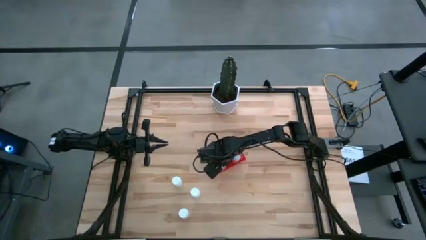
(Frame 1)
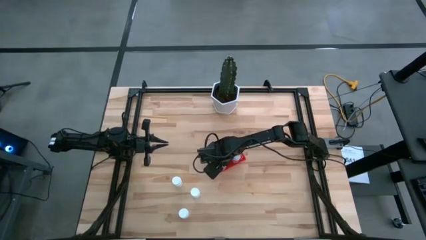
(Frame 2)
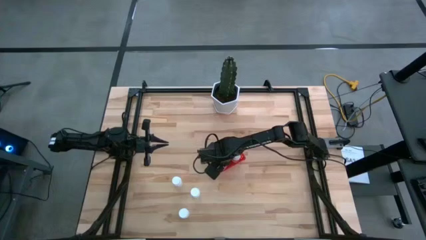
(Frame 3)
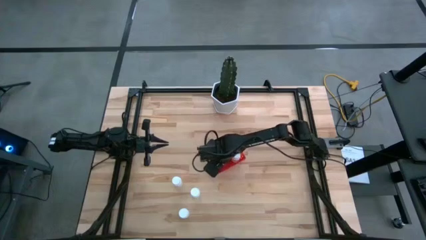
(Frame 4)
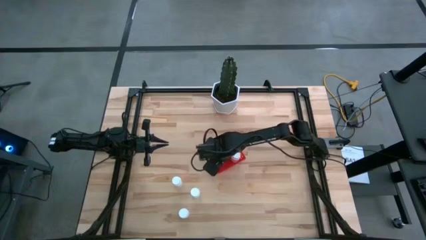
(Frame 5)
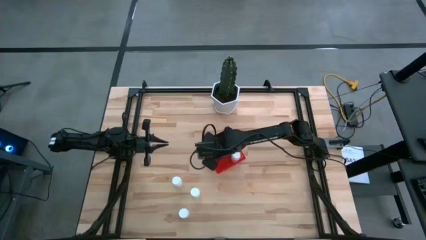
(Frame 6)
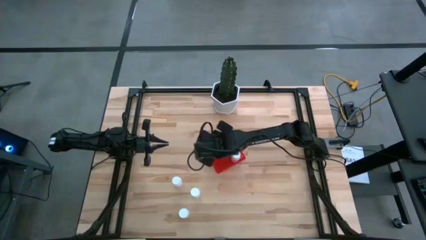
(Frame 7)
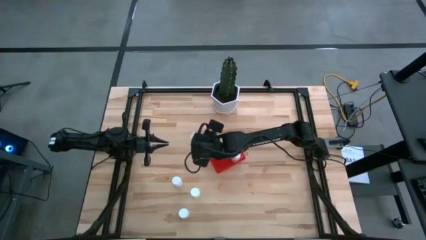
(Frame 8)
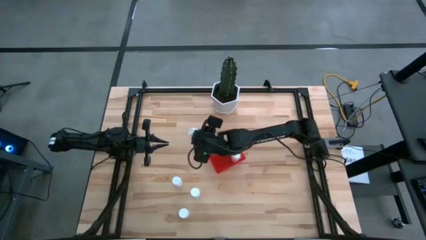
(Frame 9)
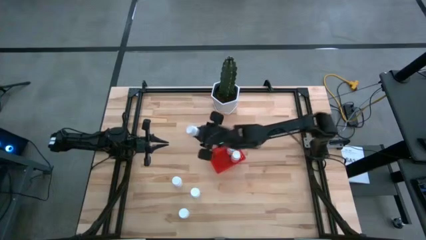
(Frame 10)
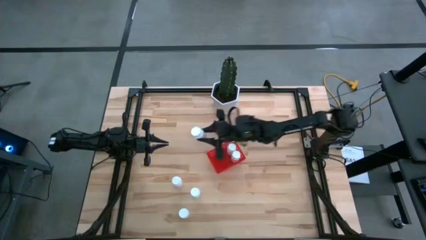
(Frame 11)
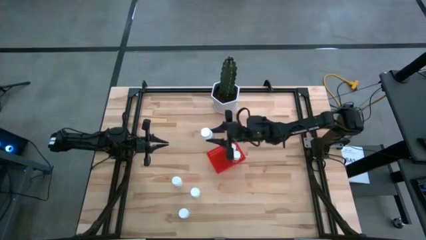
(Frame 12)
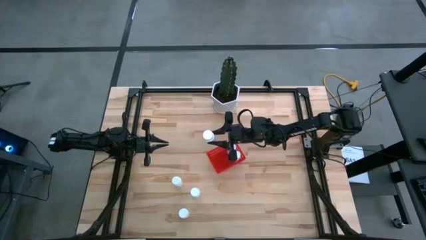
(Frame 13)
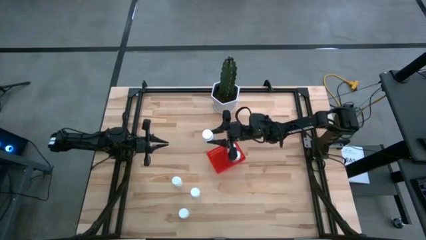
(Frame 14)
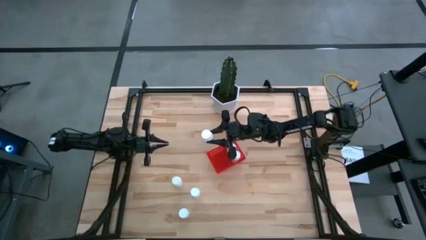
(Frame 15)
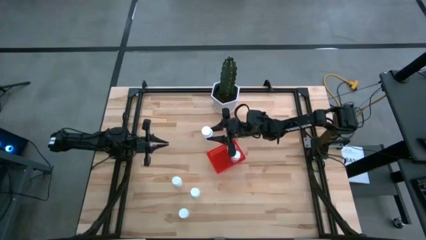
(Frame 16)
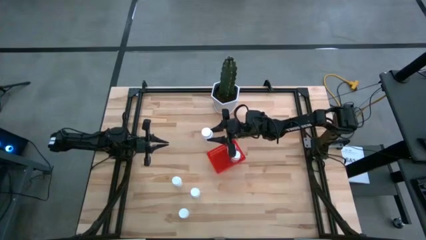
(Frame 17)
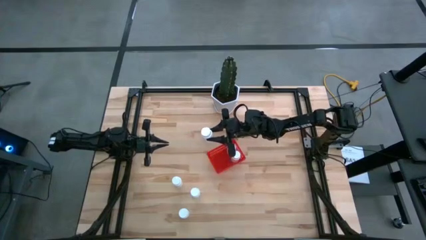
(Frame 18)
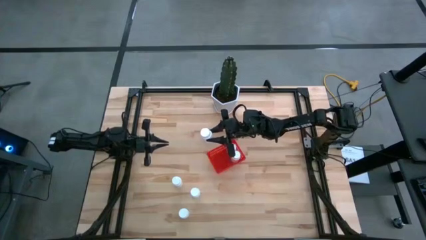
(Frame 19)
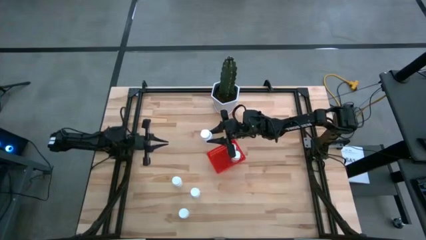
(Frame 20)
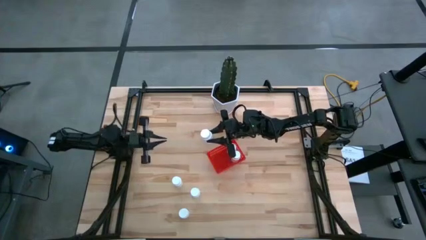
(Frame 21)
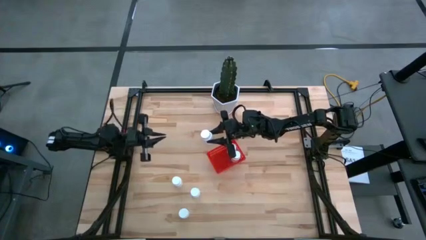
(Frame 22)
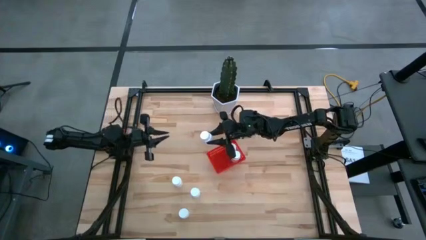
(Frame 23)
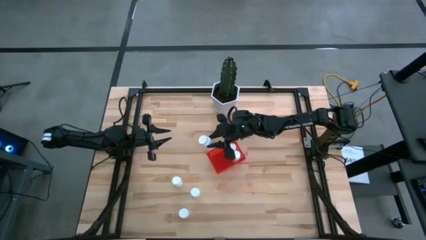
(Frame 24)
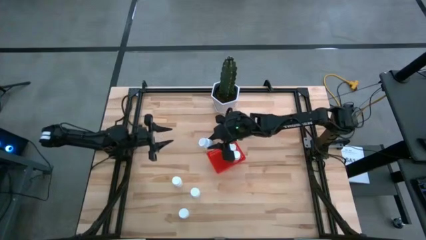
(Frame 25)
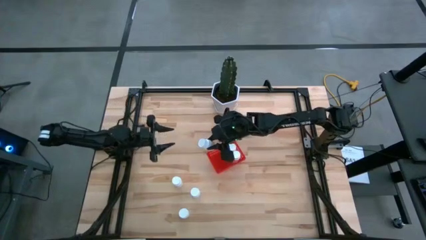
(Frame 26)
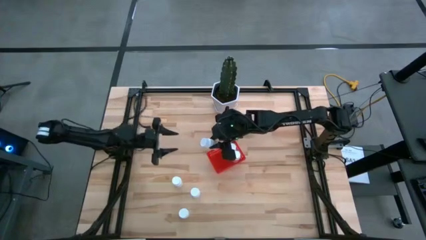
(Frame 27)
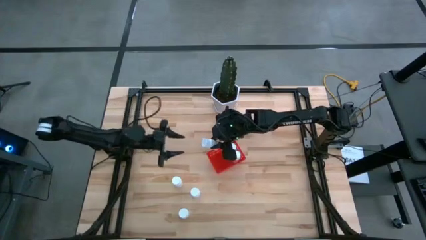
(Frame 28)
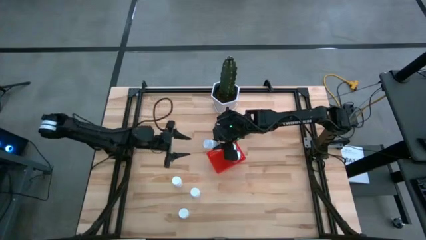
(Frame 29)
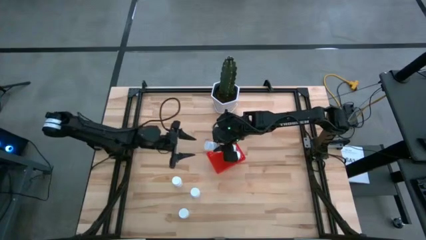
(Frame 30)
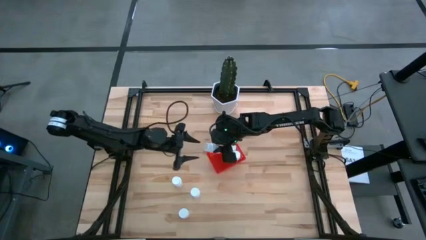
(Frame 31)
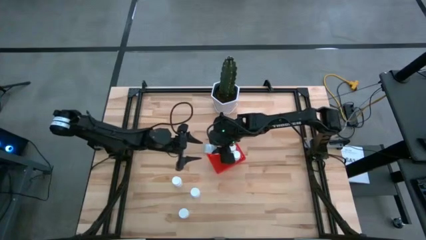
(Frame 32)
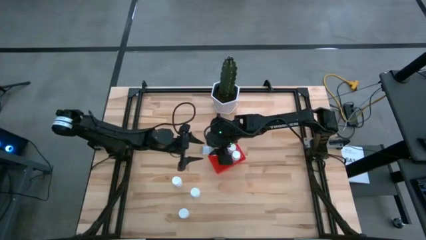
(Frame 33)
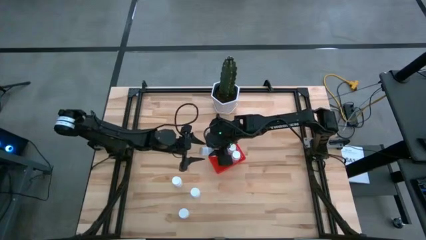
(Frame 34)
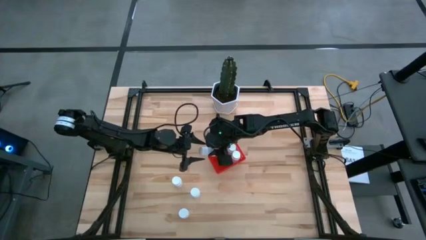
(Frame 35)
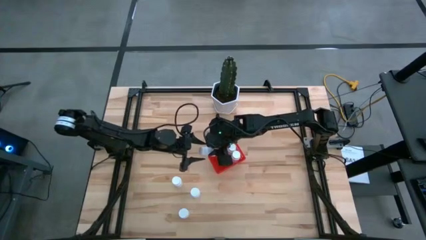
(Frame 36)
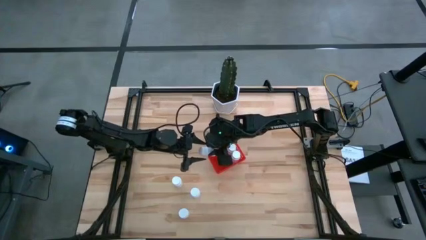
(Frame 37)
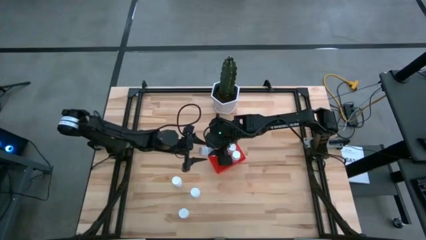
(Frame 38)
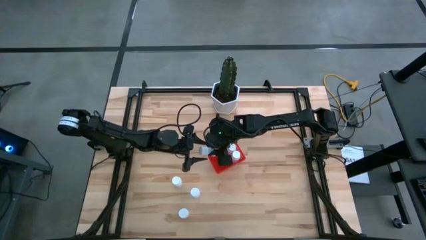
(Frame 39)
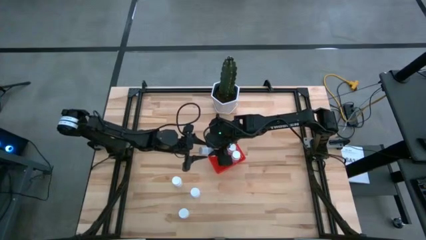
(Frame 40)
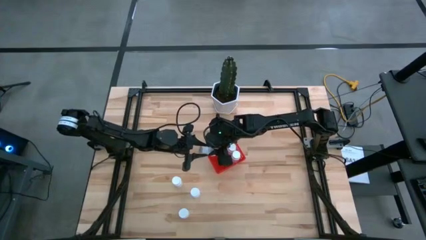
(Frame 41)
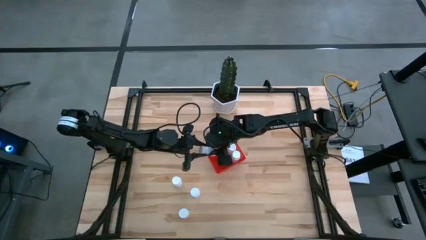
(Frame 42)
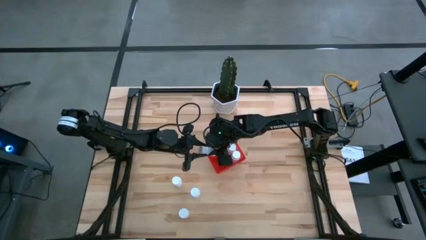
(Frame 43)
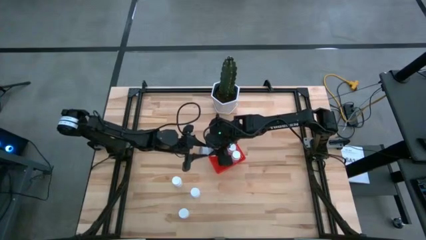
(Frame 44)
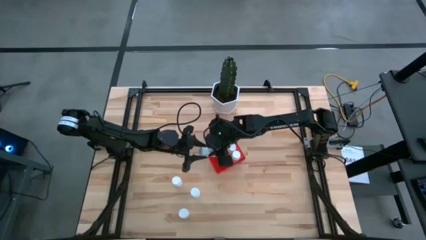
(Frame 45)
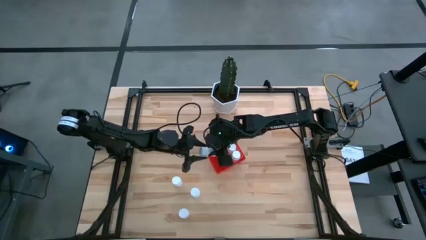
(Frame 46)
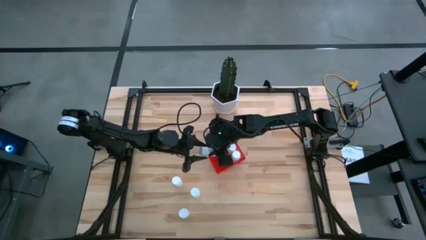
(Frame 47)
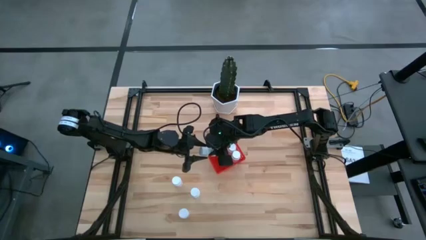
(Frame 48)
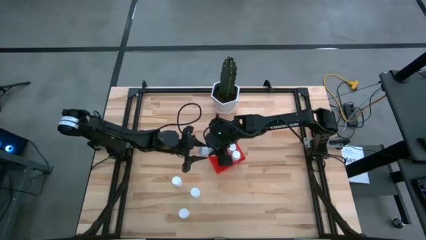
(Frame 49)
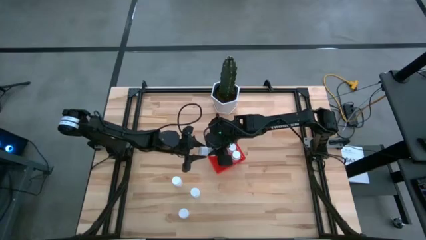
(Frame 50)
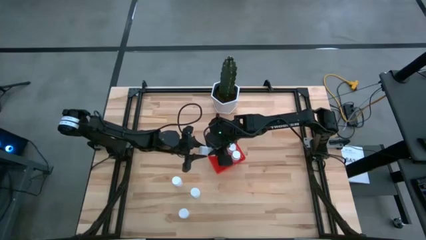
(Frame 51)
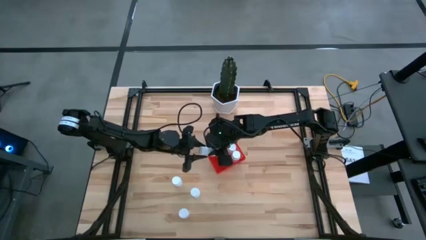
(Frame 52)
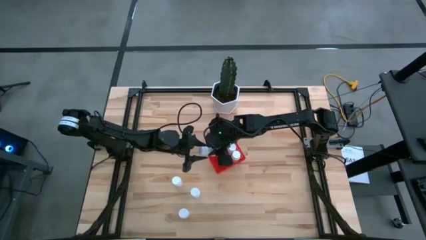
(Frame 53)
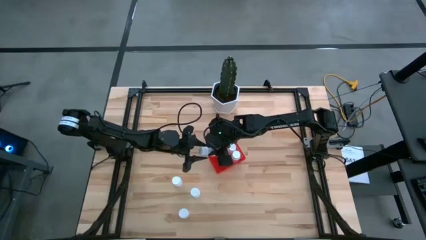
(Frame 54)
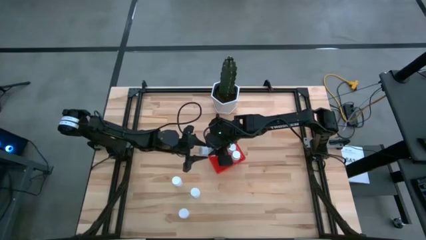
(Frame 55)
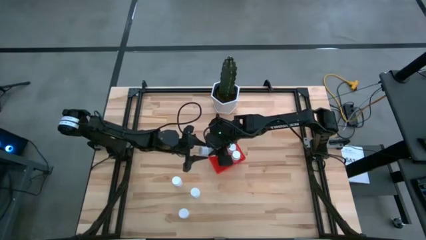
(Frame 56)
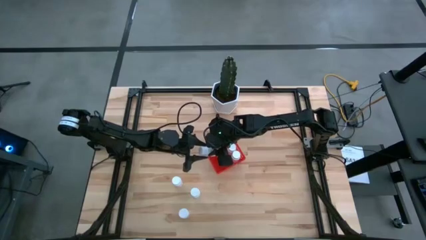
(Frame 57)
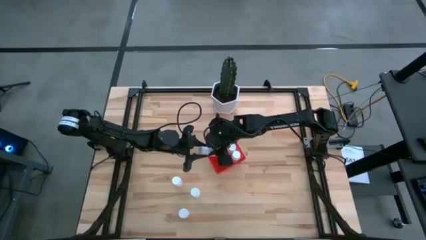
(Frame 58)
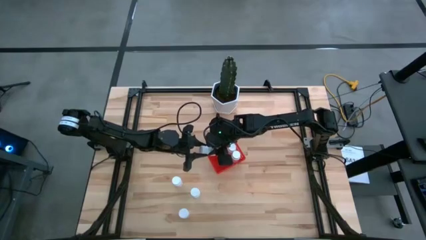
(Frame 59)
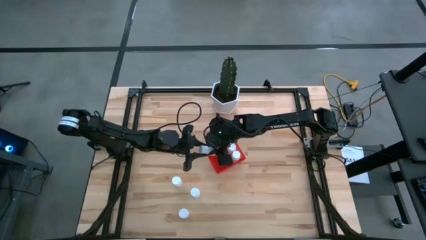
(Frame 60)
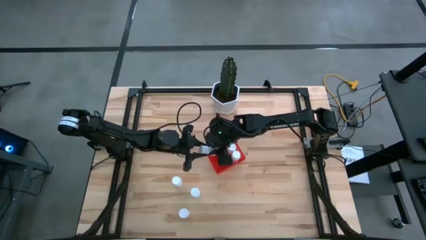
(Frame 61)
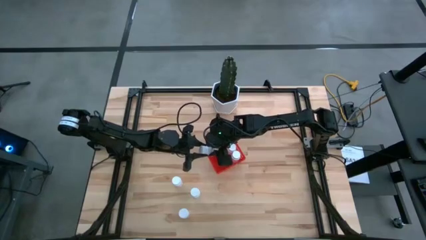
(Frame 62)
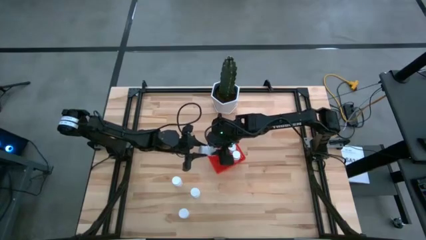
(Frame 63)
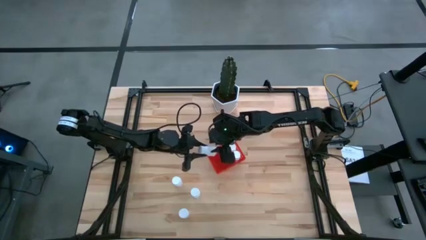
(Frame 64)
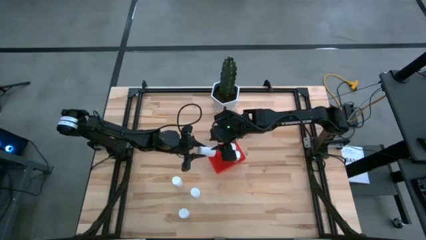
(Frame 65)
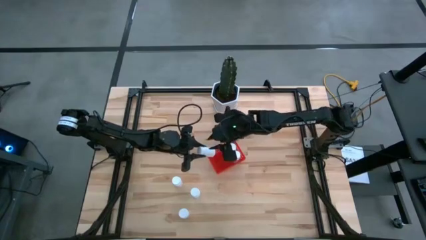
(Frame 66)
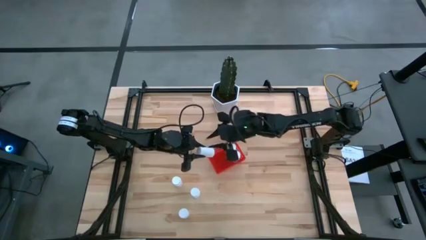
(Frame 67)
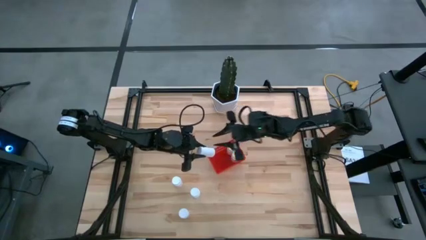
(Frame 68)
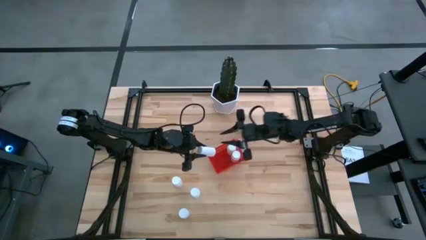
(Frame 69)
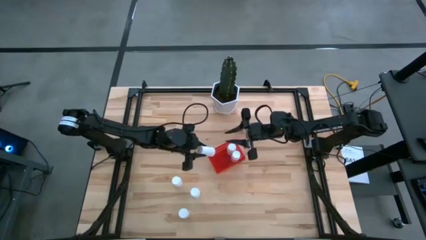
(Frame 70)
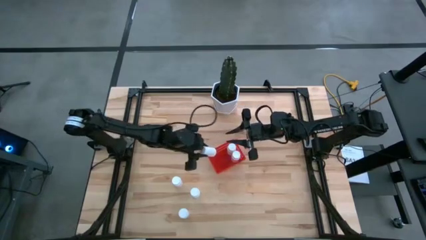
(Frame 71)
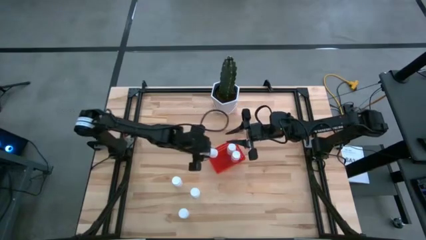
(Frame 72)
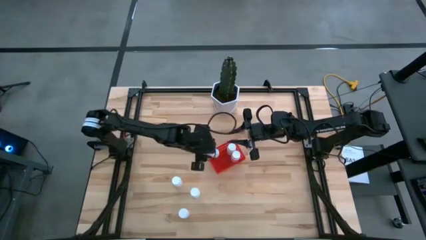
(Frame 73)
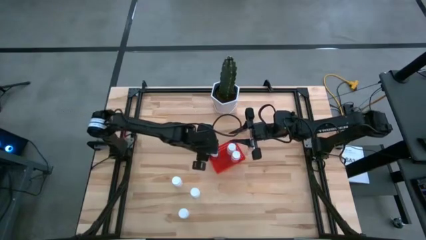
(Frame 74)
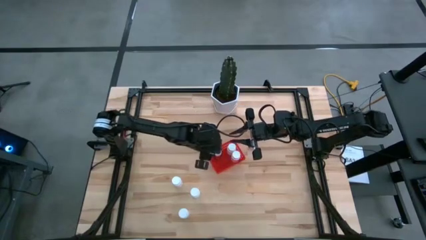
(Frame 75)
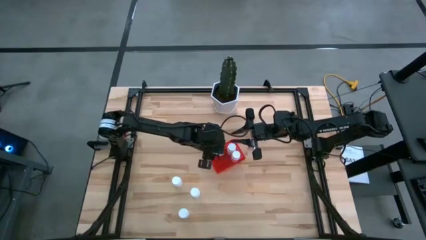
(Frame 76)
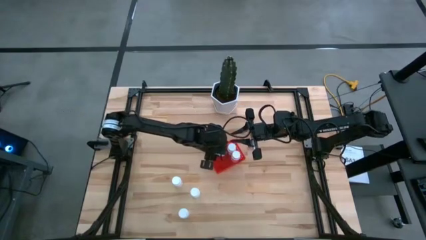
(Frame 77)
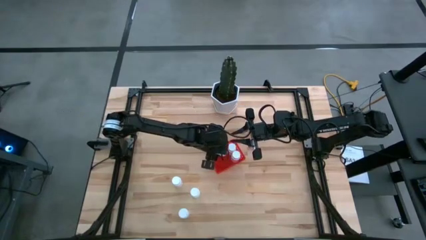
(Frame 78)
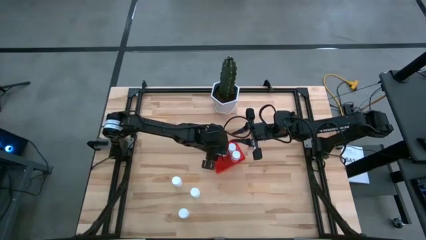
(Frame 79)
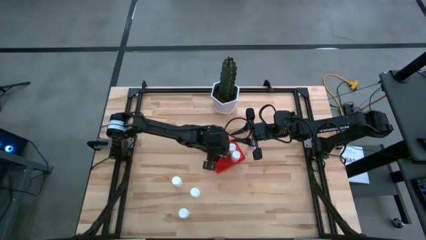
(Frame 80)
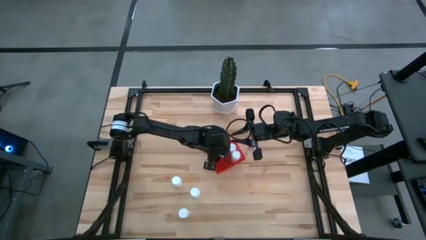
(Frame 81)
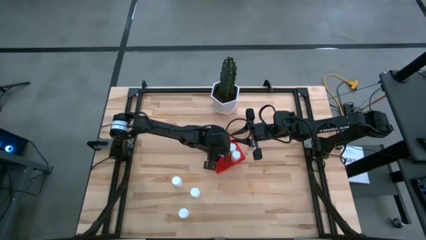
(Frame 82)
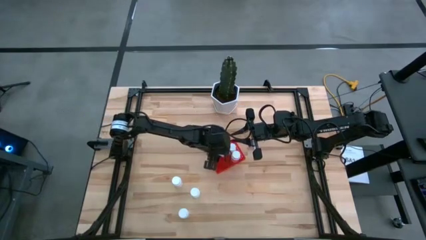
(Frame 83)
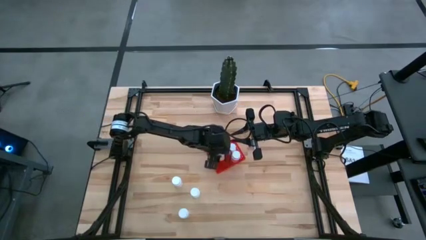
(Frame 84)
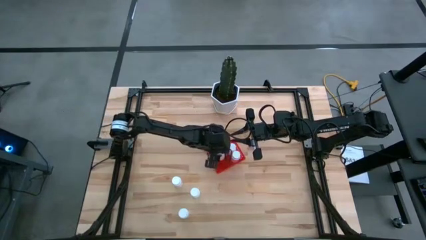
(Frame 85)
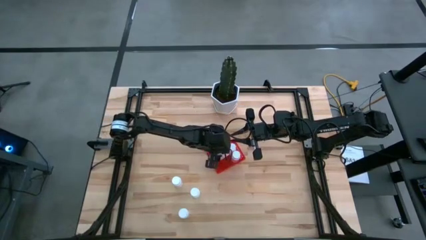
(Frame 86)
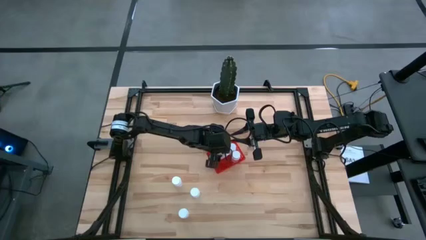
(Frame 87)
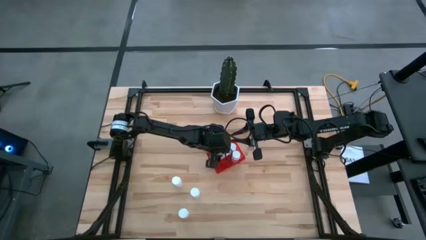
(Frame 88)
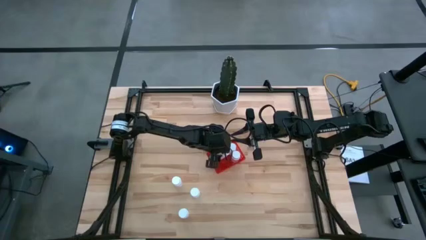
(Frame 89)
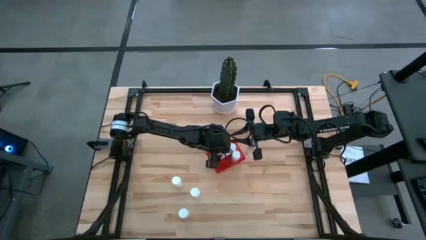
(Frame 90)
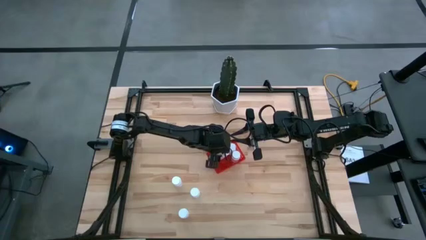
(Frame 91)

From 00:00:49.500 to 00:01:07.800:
Task: Pick and place pill bottles into a basket
Put the white pill bottle into the red bin
